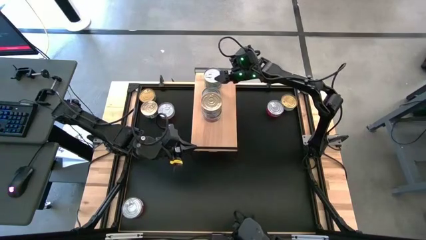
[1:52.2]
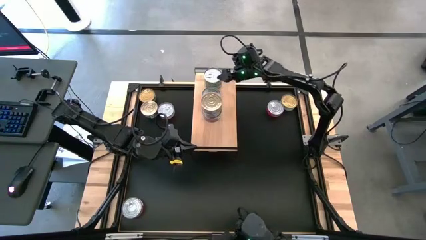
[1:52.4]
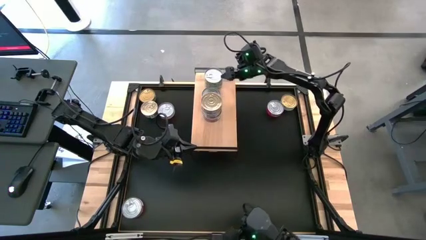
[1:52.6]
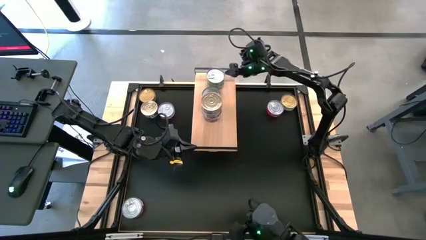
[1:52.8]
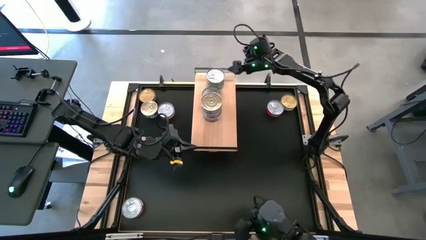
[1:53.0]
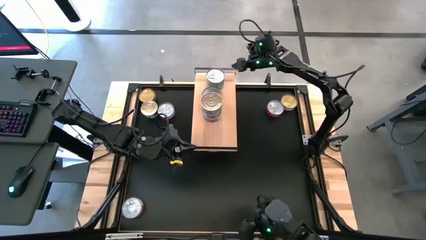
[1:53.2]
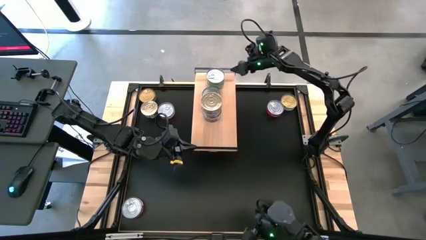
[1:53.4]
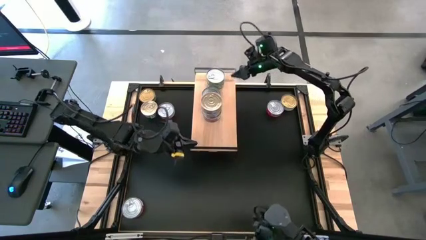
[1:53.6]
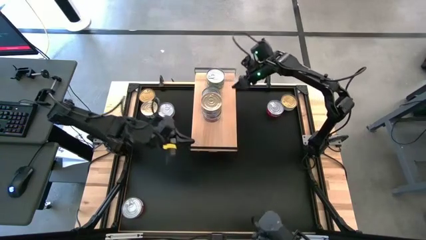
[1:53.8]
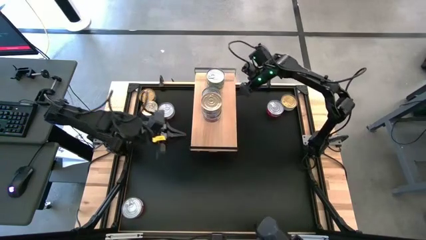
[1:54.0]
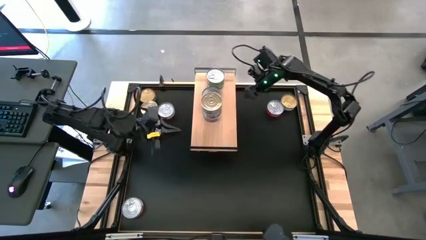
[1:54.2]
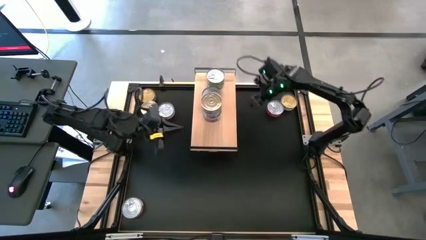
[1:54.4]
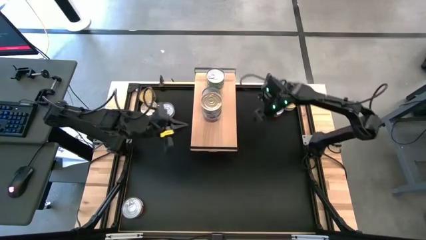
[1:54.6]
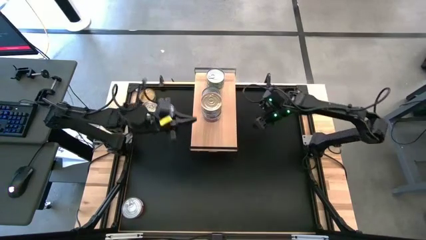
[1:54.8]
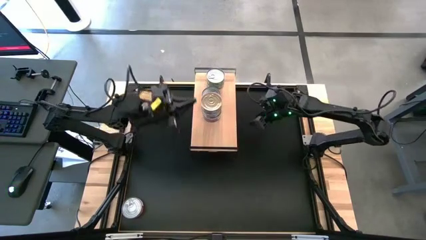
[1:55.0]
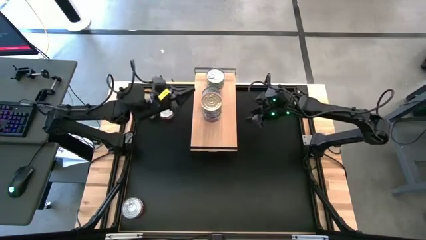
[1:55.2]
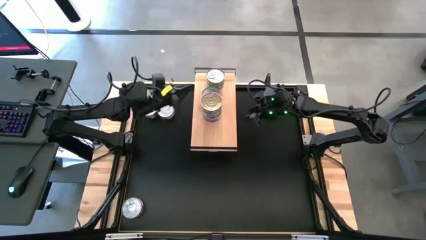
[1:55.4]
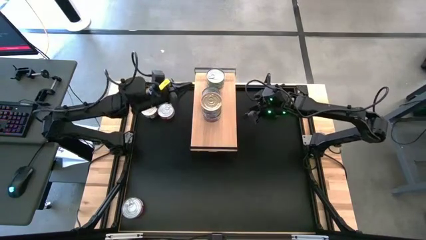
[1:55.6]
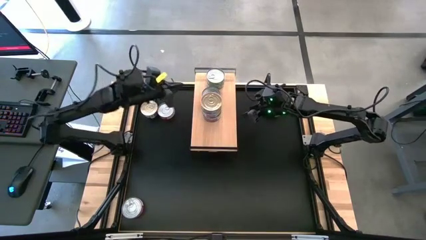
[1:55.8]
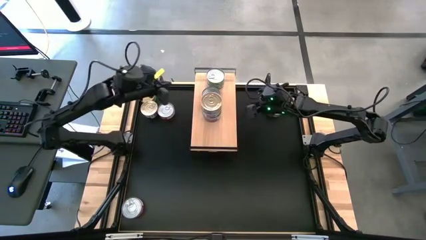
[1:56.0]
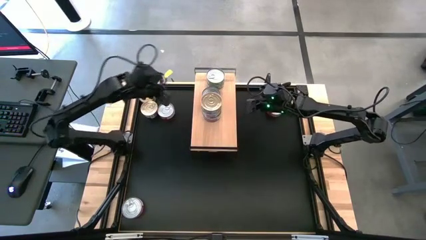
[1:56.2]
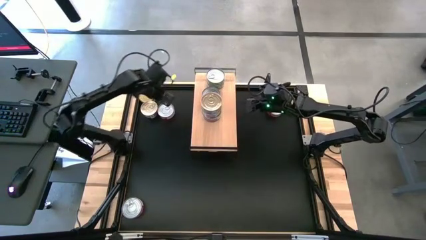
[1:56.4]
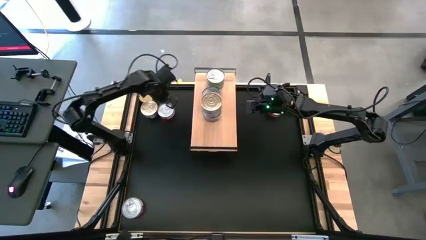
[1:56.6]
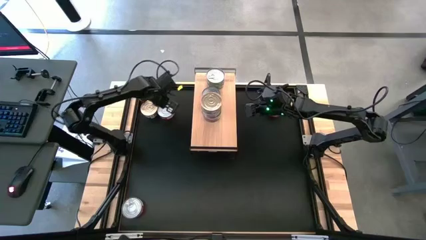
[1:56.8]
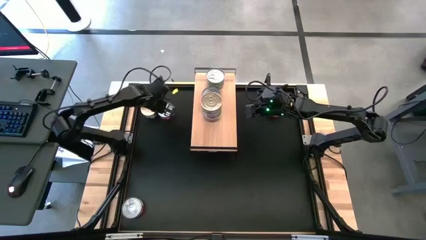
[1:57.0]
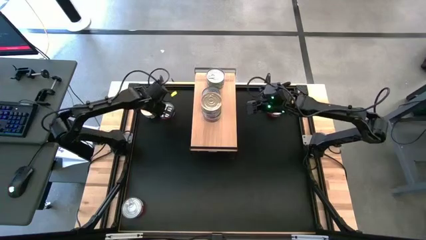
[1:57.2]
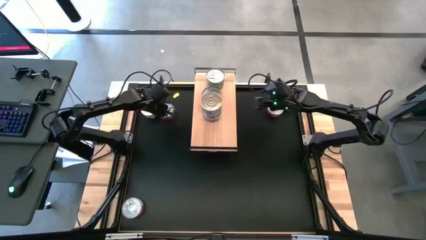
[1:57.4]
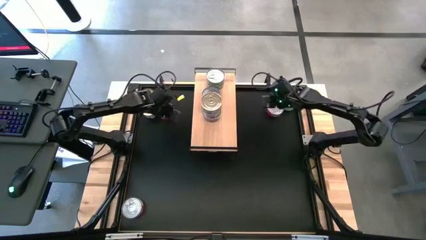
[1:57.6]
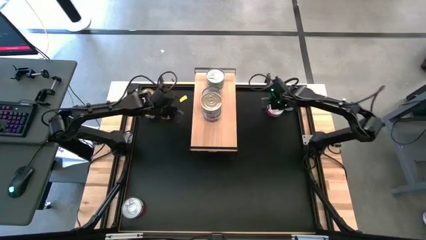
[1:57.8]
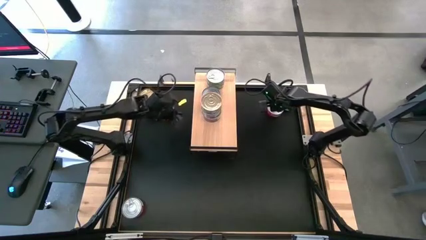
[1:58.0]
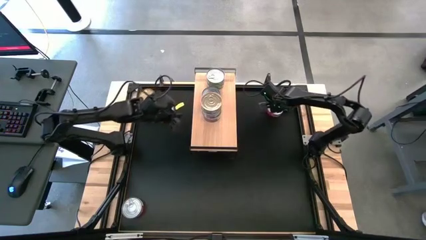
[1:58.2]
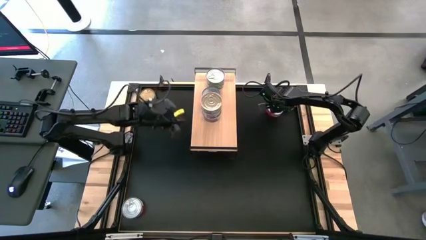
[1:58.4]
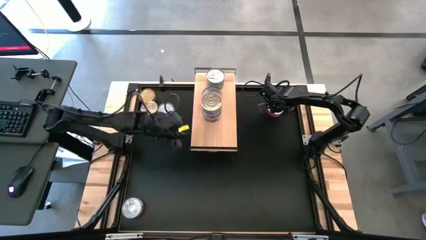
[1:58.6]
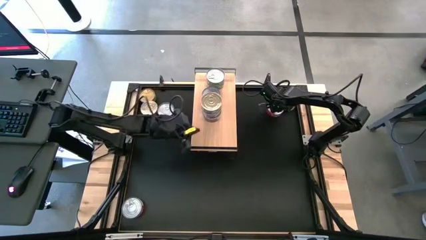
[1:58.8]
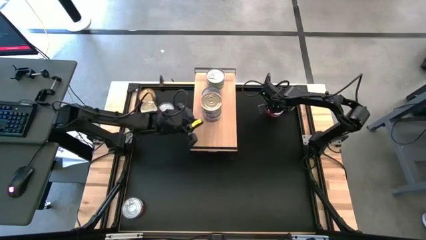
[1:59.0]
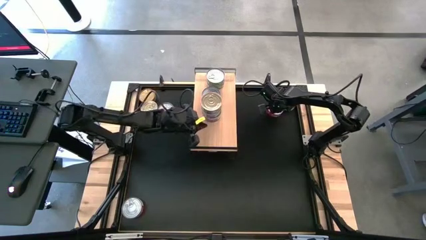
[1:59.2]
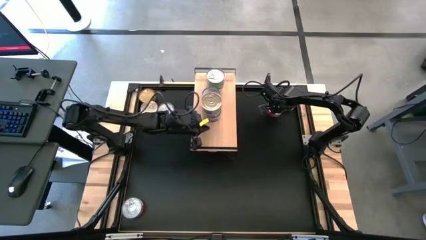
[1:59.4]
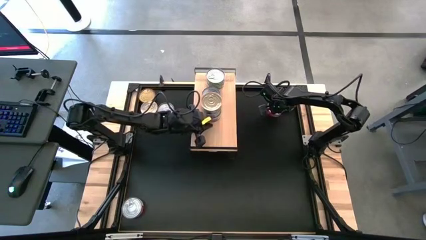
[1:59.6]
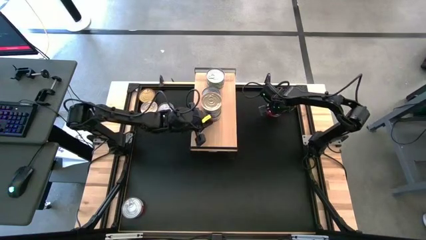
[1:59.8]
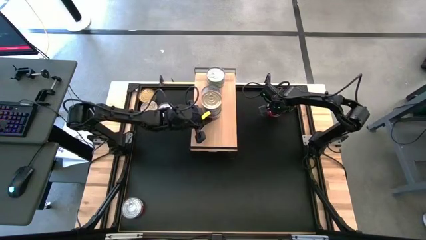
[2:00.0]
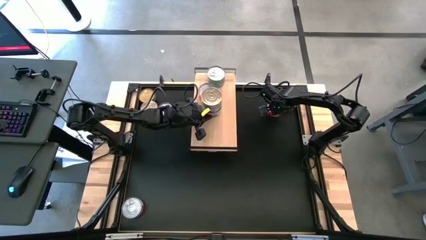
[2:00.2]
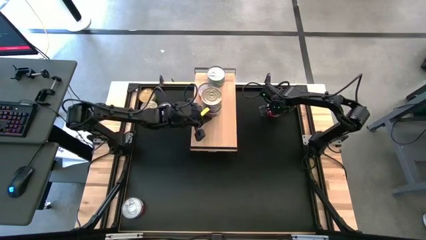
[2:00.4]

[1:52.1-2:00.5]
Task: Stack canned seafood by type on shelf
Adjust the blue pink tuna cans on the shelf

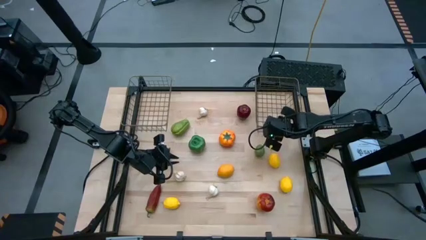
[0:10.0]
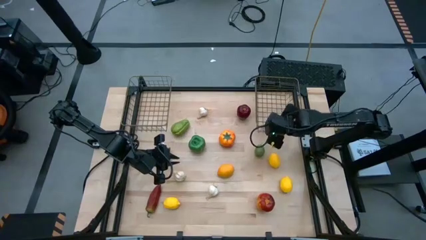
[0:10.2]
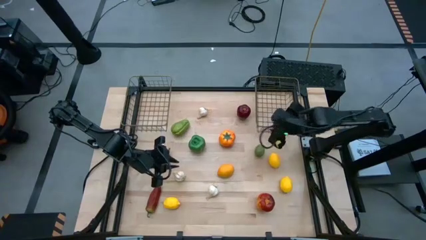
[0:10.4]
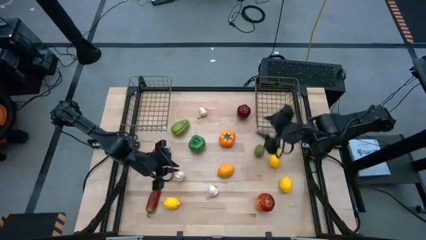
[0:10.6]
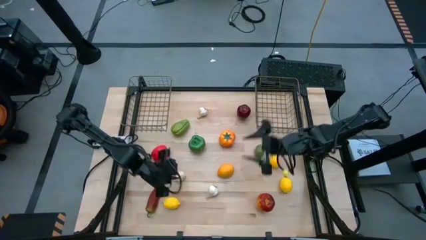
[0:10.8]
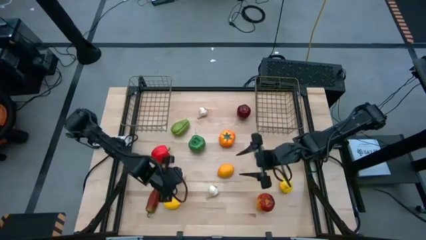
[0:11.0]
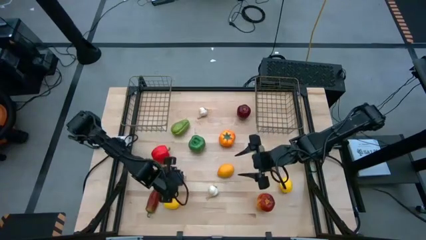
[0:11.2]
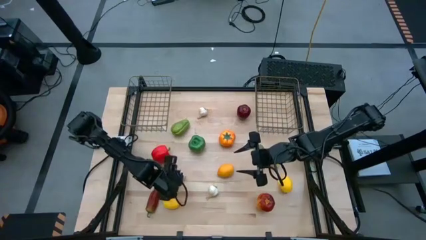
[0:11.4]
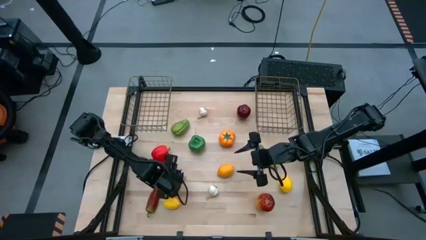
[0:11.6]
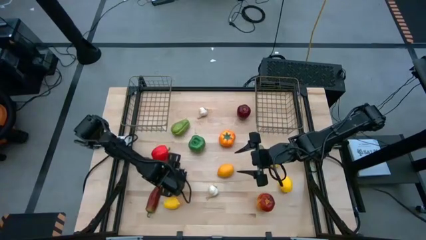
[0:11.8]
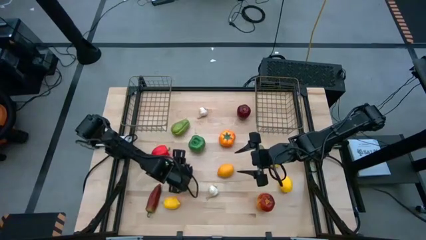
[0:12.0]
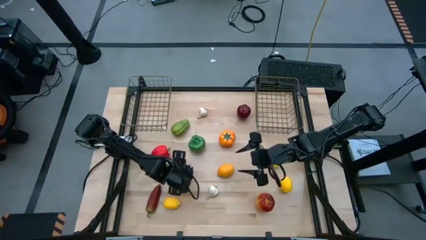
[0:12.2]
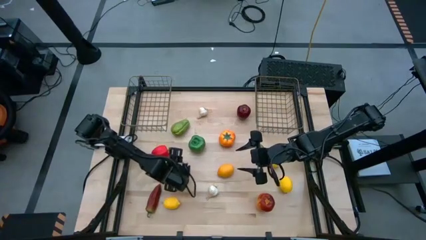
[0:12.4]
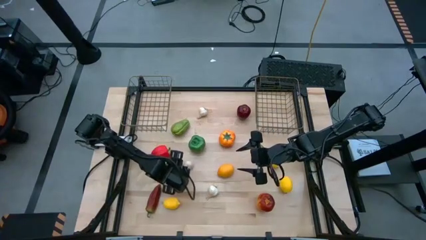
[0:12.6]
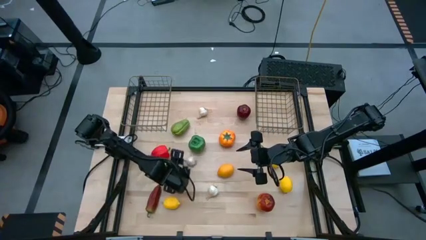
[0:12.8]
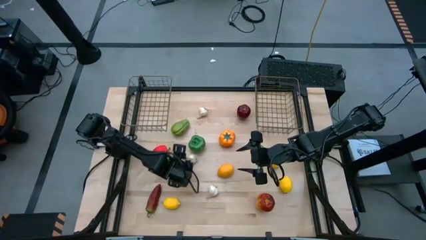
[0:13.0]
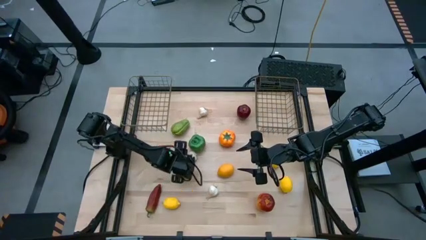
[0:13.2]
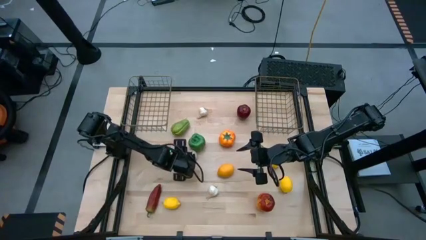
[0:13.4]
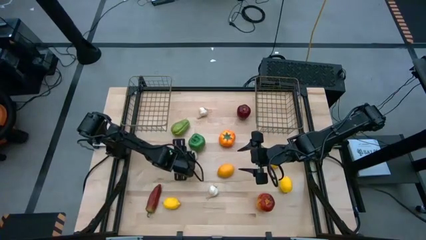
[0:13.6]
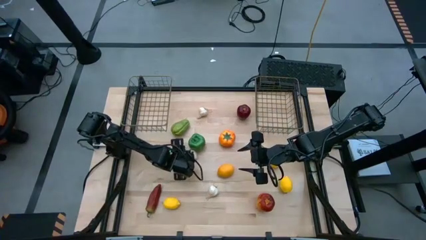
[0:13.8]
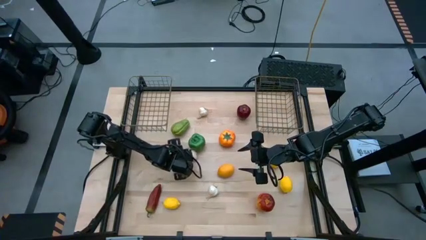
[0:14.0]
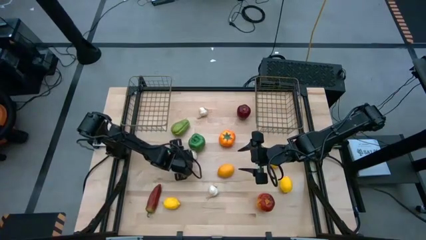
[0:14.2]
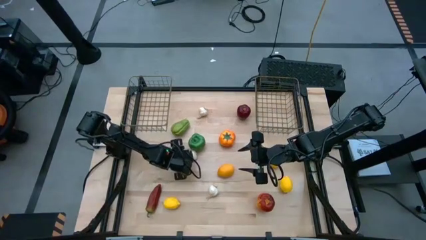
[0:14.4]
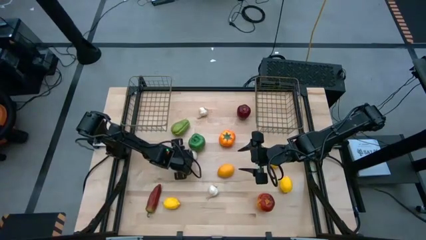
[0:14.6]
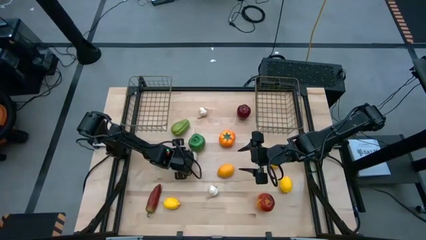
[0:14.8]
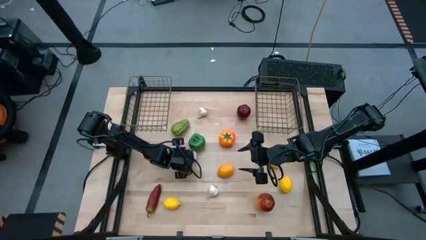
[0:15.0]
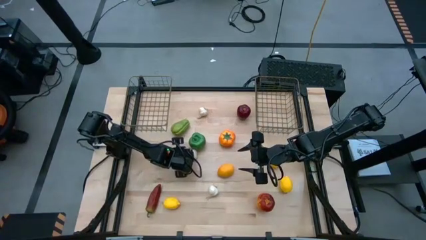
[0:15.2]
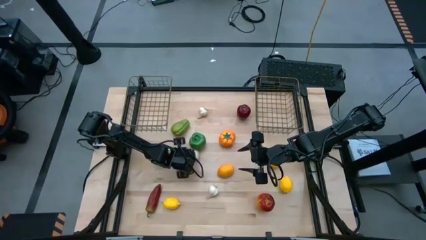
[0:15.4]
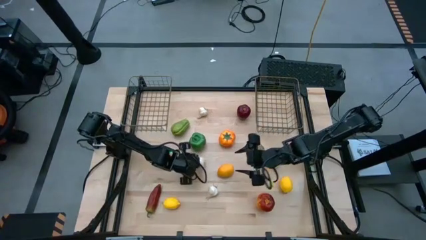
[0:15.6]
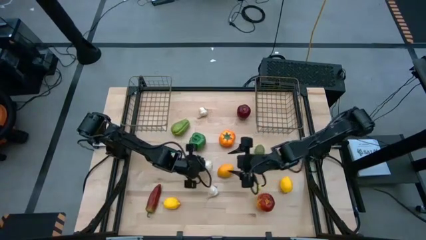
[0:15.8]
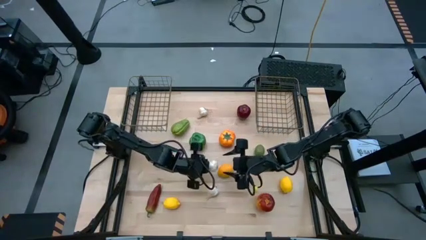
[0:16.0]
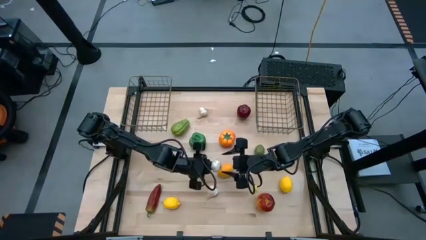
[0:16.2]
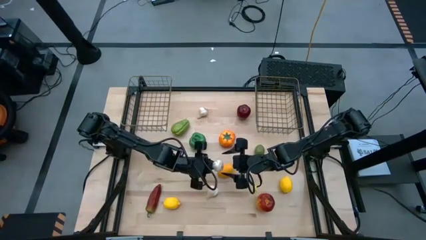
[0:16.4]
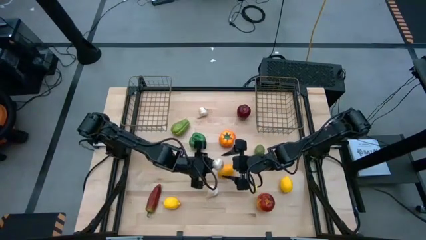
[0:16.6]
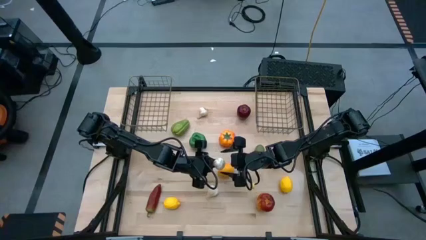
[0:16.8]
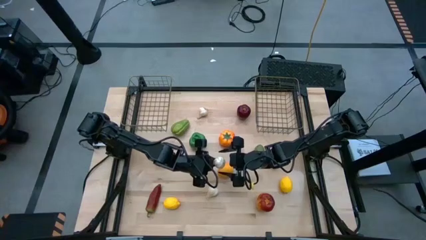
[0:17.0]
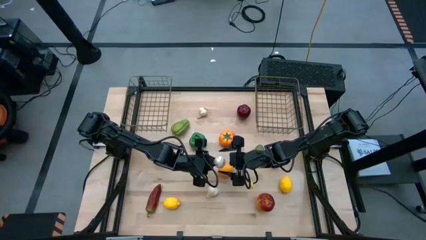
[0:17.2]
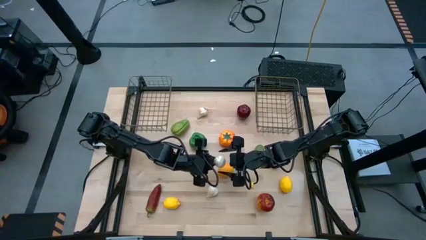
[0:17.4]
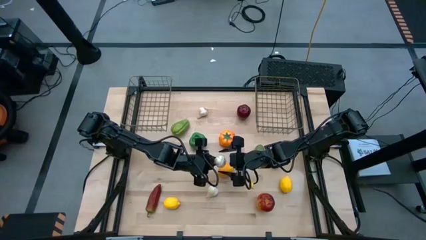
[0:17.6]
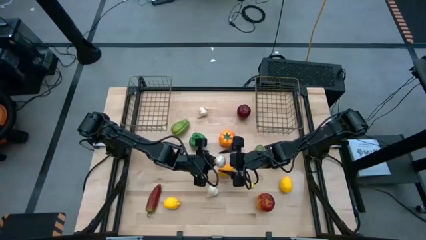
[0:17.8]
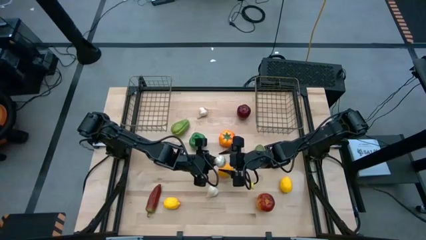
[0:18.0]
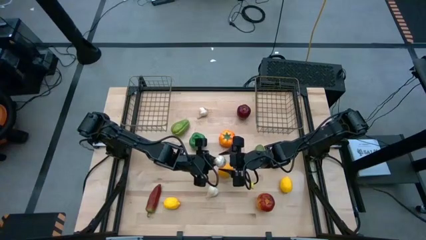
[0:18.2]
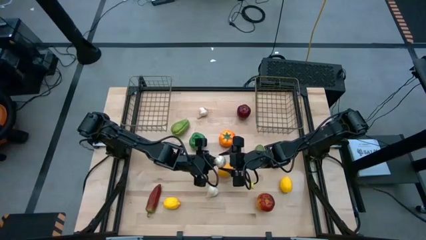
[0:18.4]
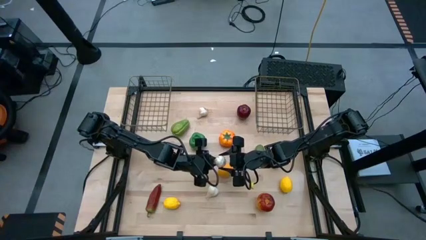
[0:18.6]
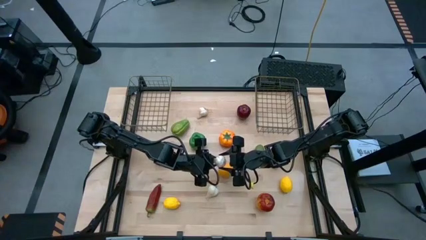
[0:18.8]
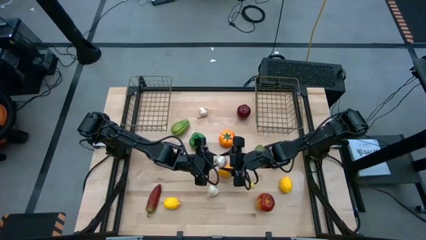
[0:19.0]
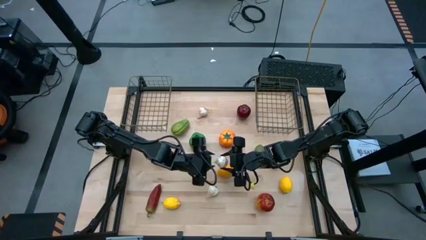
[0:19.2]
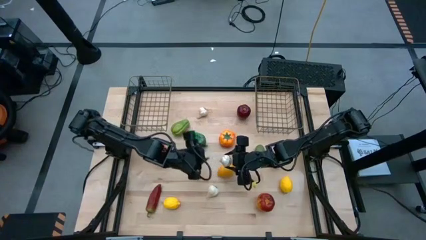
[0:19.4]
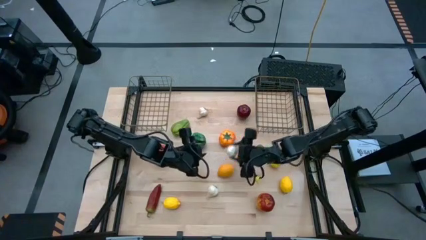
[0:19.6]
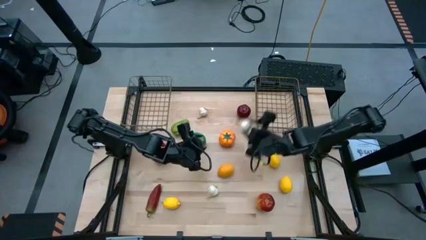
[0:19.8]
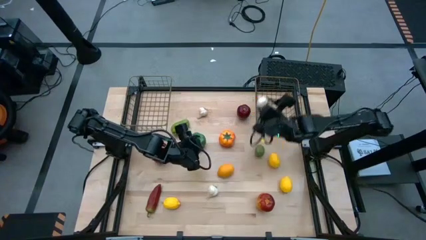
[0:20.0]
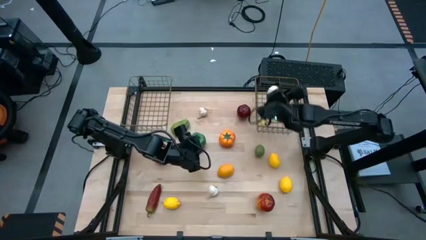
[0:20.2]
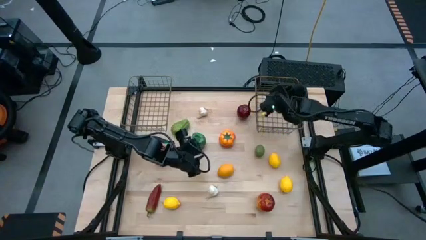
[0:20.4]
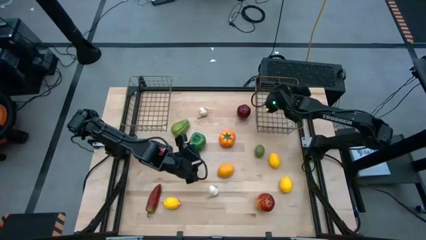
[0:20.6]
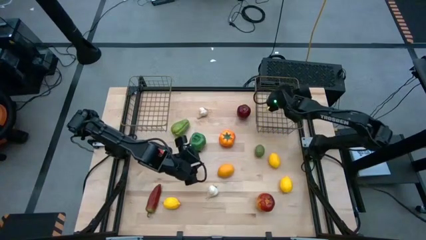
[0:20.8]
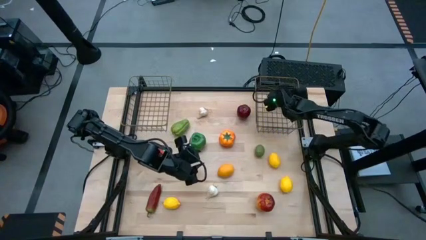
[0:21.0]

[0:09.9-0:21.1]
Task: Sort produce into baskets
Put the bottom left garlic into the right wire basket
